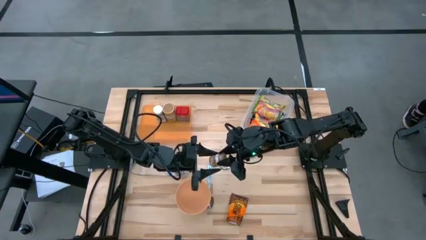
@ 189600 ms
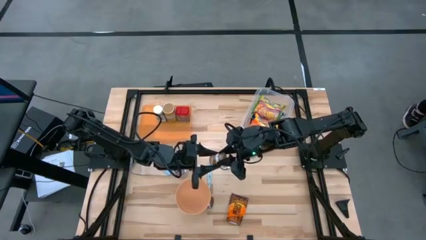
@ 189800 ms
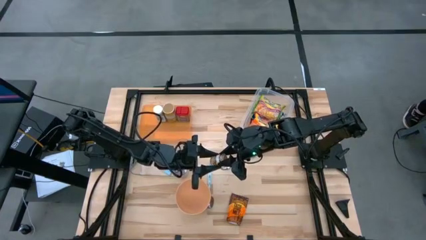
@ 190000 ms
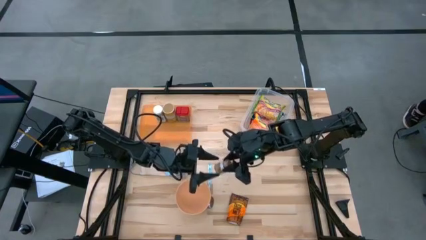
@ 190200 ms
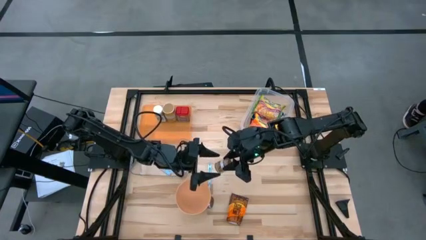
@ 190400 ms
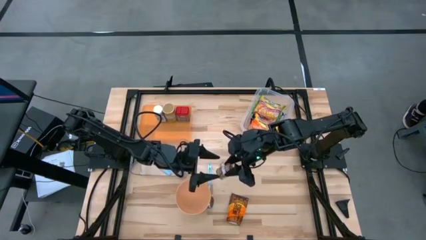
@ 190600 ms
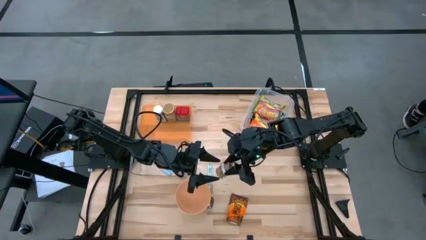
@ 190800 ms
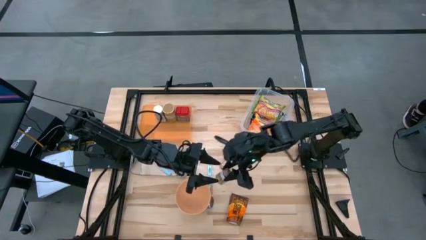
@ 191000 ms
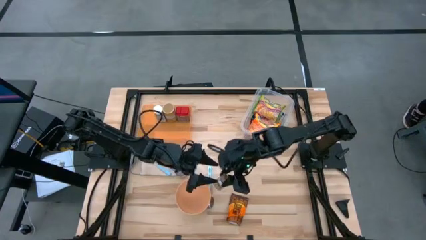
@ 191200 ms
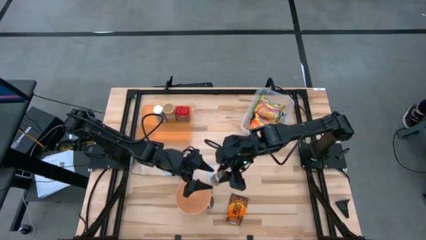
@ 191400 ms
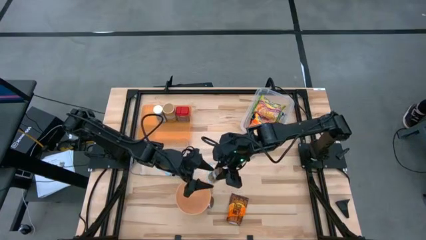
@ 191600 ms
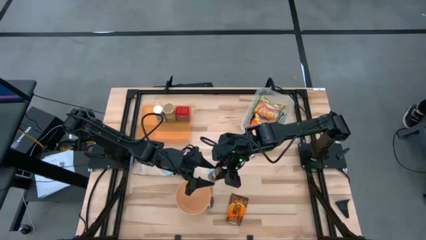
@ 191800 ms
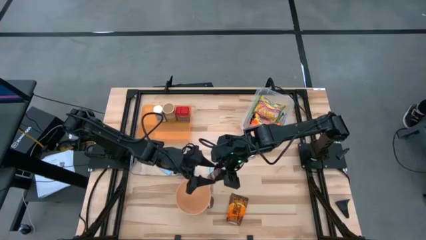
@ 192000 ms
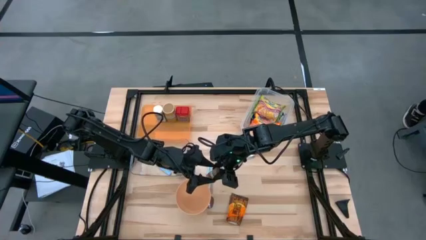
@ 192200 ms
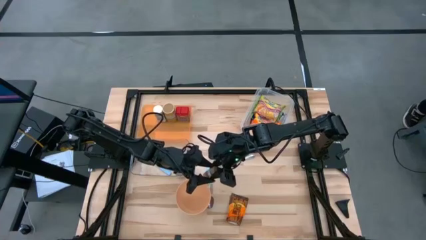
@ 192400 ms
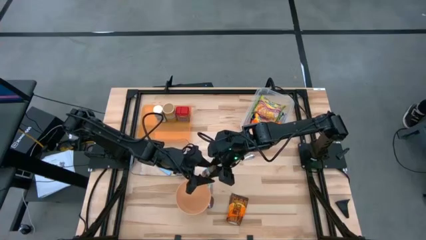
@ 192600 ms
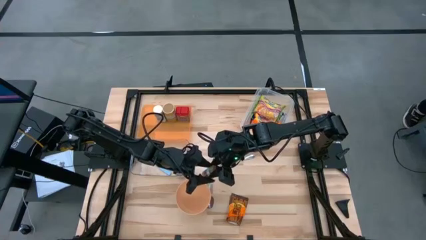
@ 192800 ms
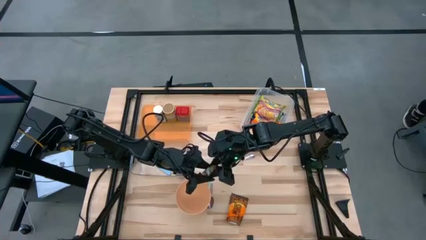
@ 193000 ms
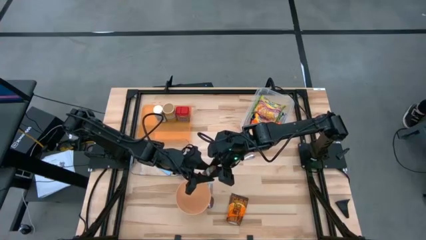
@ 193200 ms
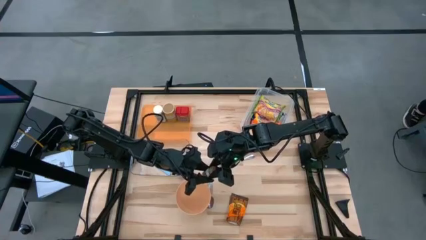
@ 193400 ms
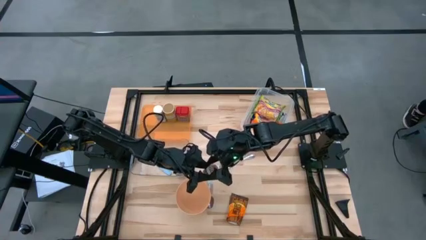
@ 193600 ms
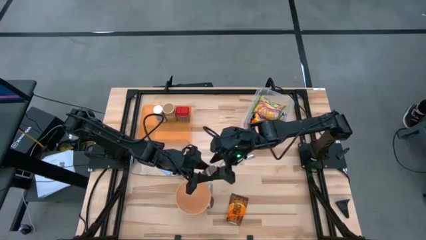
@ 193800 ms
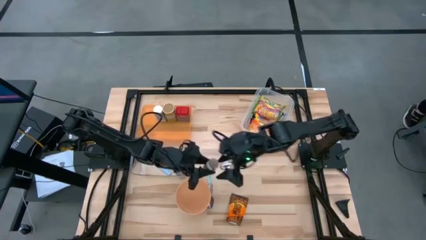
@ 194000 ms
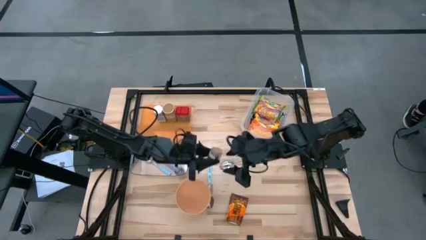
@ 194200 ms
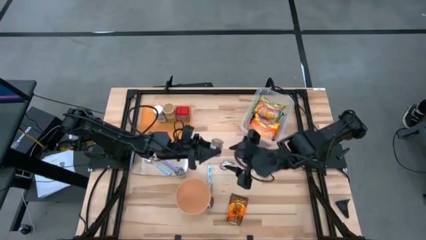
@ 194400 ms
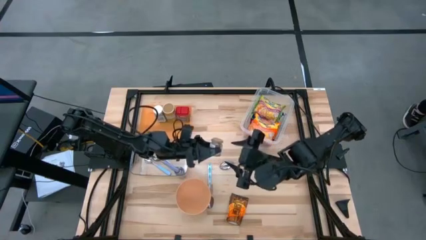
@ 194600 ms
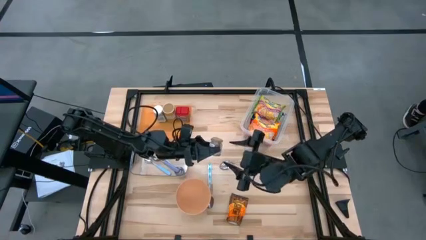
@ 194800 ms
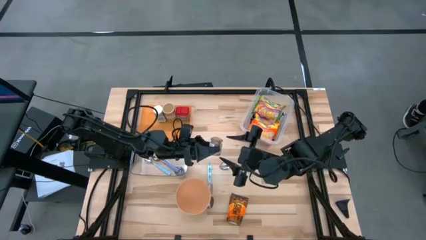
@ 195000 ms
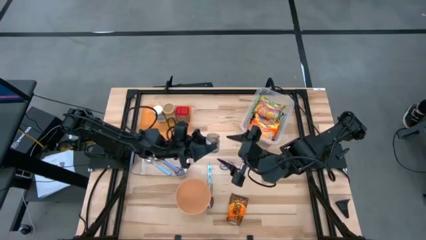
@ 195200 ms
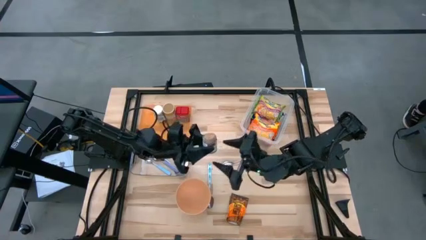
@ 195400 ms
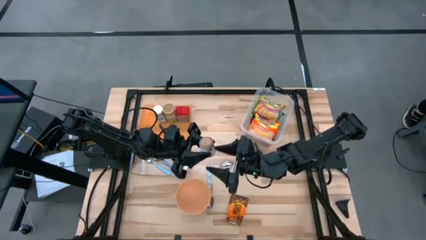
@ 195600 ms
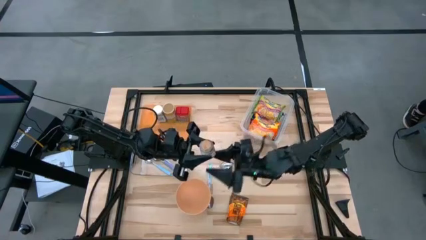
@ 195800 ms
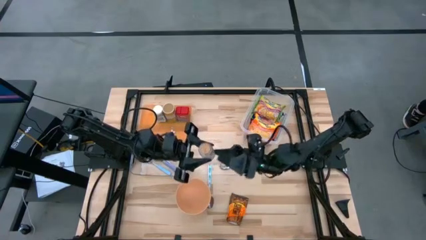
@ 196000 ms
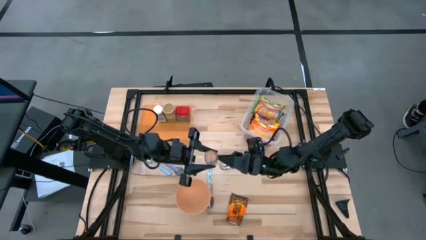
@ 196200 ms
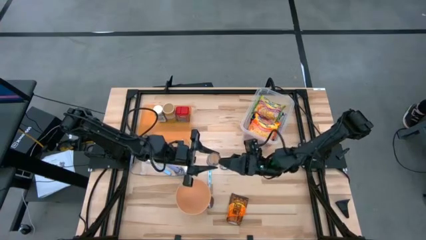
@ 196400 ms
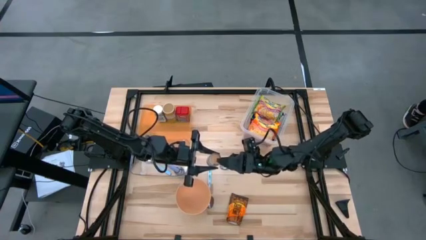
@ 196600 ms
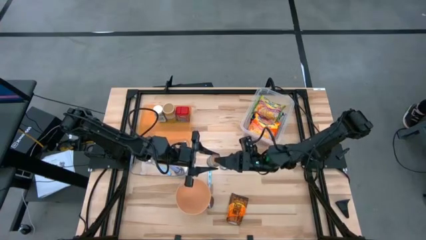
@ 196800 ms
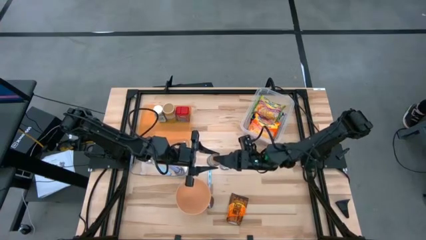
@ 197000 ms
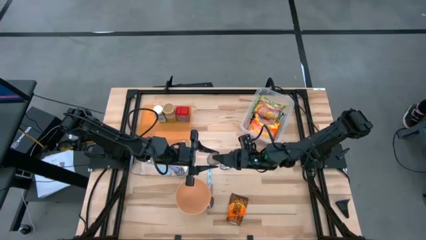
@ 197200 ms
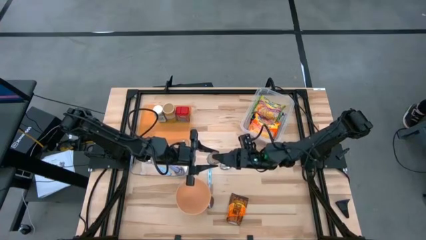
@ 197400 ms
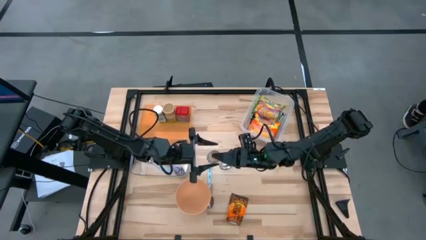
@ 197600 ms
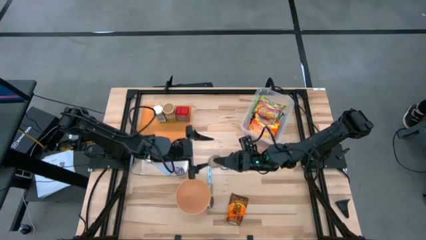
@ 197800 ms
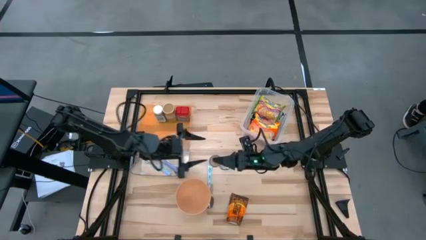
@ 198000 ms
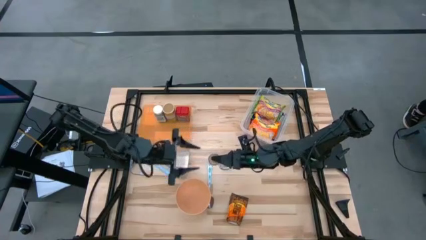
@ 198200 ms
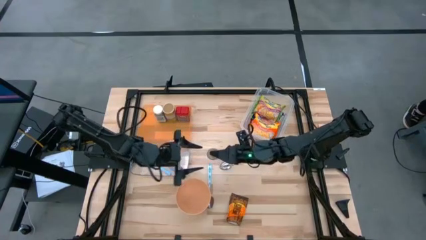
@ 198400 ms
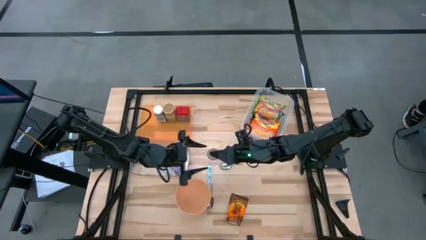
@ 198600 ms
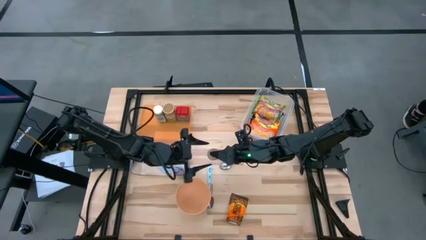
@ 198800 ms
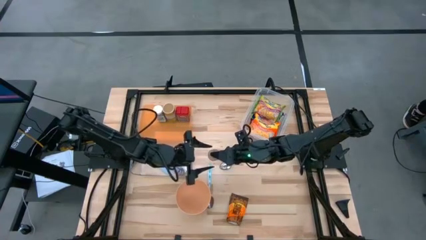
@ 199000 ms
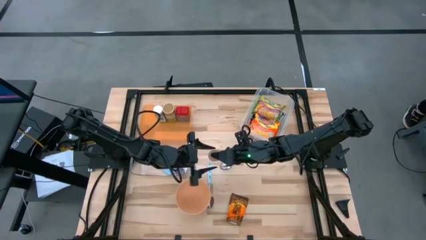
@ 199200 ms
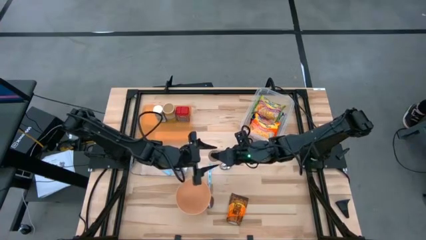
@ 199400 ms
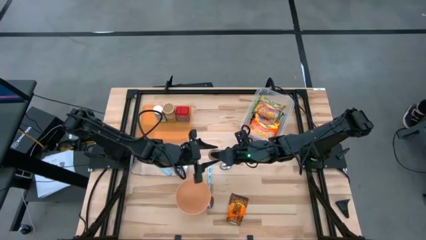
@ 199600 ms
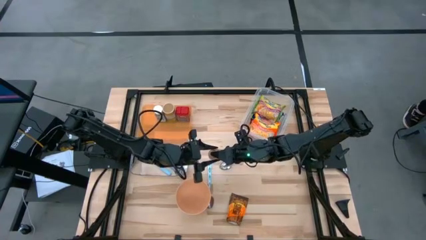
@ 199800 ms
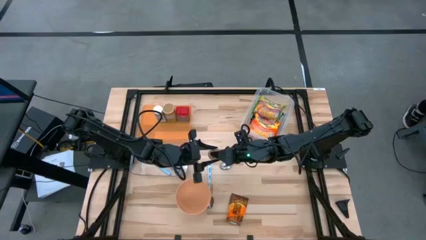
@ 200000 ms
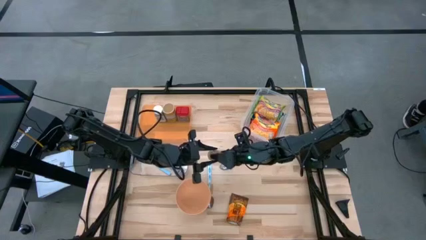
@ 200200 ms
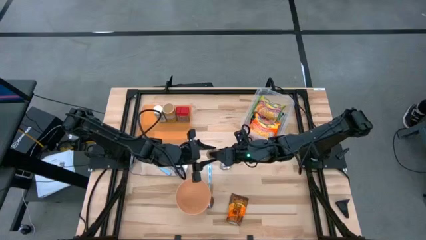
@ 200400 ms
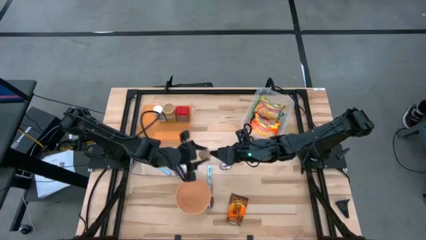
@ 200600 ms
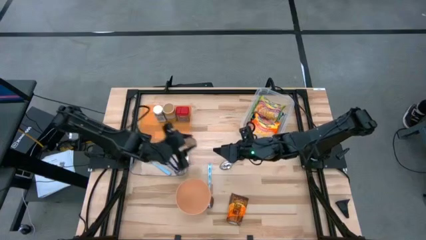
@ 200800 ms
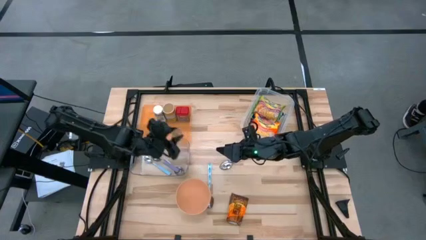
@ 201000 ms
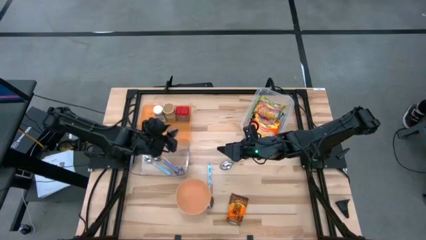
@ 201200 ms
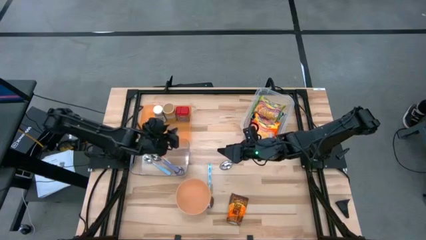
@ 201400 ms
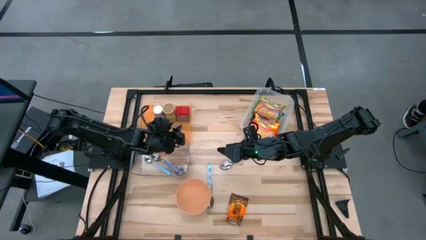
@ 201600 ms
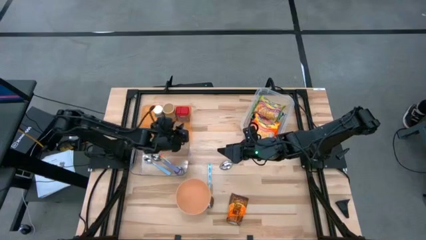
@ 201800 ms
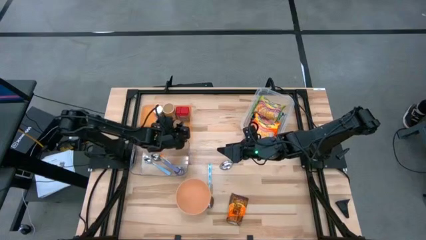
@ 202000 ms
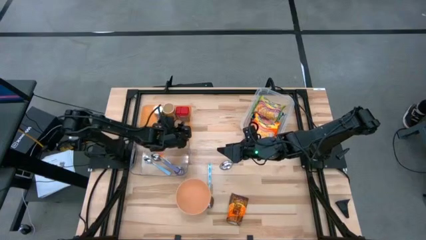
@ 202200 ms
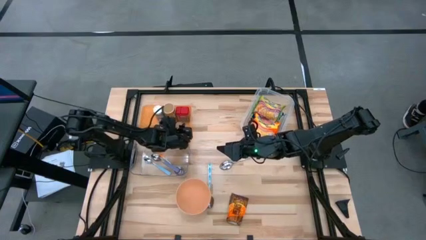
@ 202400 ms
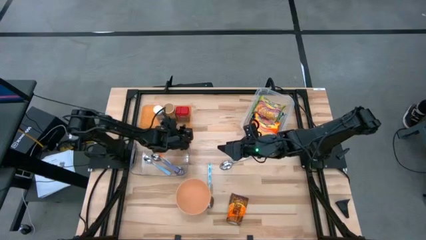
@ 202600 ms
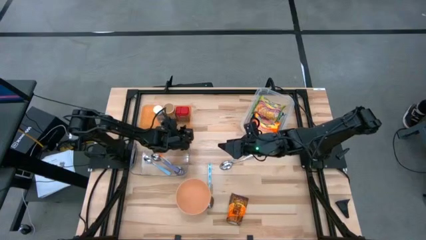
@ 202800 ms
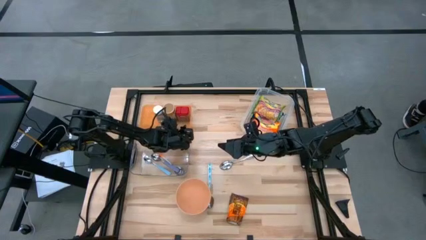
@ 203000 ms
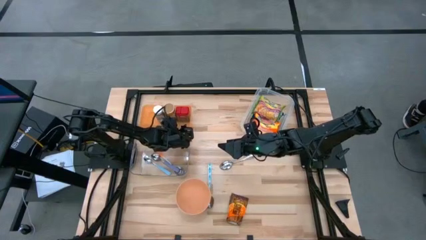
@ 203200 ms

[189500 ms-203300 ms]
Task: Pick & Place Food Item
Put the brown seasoning bottle into the orange bin
